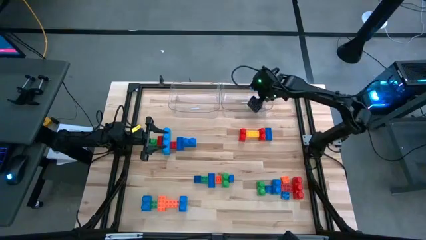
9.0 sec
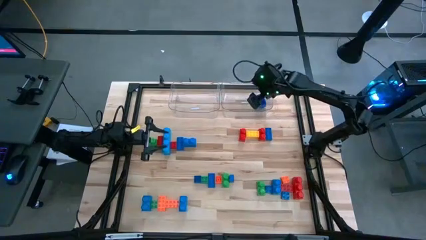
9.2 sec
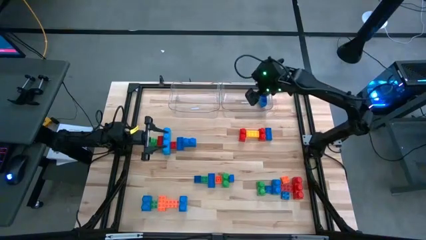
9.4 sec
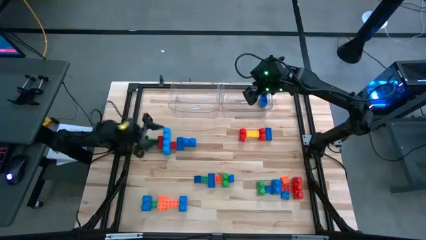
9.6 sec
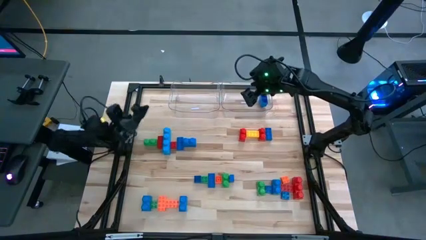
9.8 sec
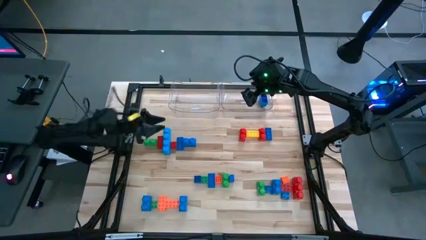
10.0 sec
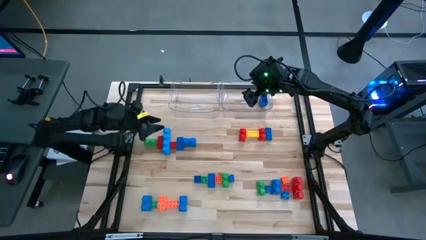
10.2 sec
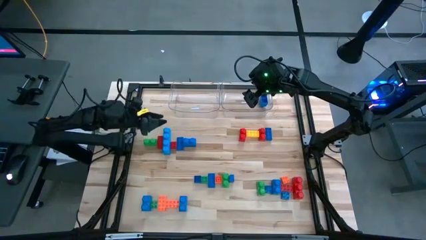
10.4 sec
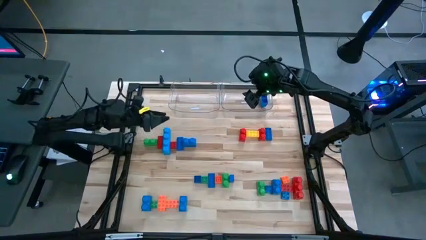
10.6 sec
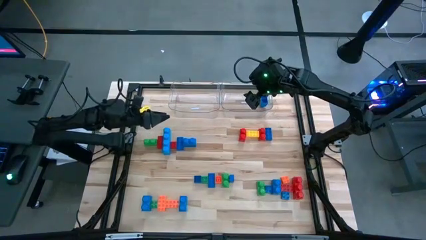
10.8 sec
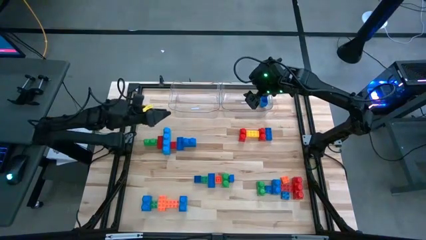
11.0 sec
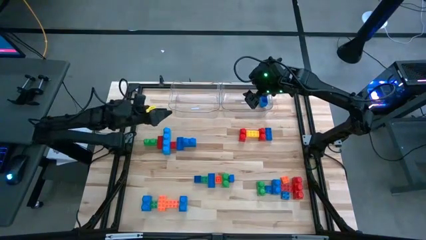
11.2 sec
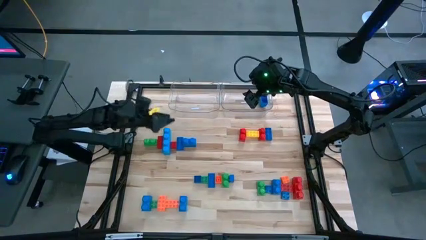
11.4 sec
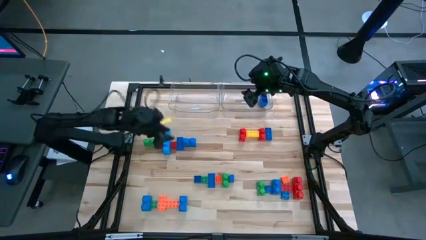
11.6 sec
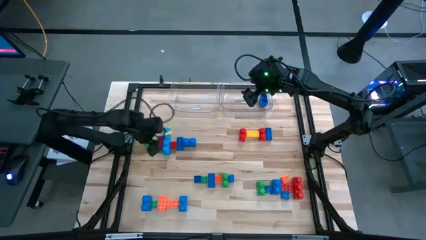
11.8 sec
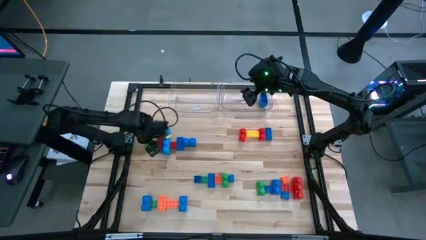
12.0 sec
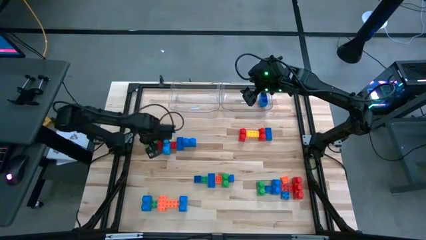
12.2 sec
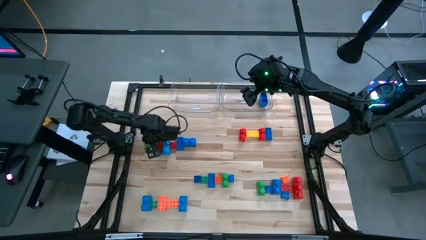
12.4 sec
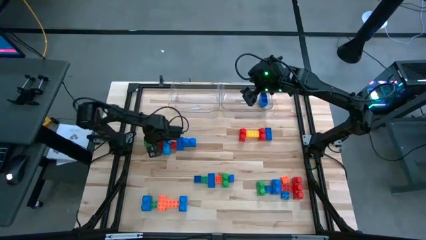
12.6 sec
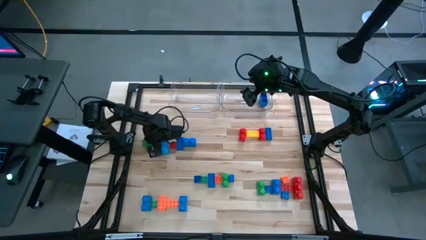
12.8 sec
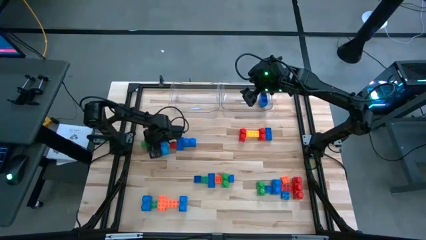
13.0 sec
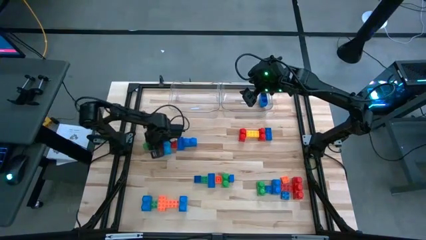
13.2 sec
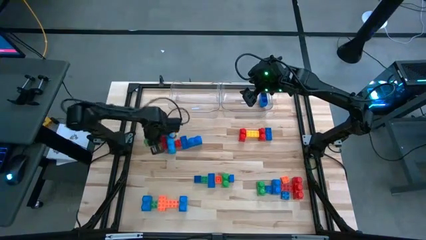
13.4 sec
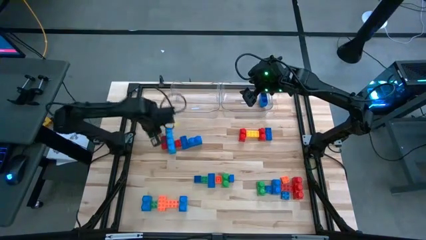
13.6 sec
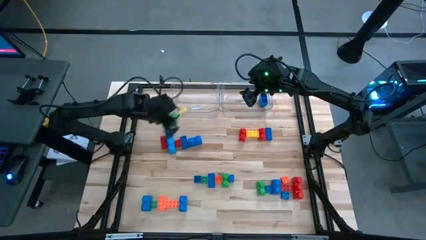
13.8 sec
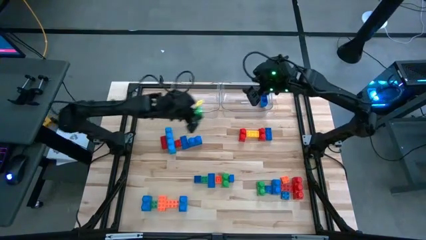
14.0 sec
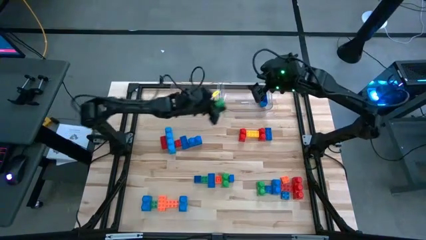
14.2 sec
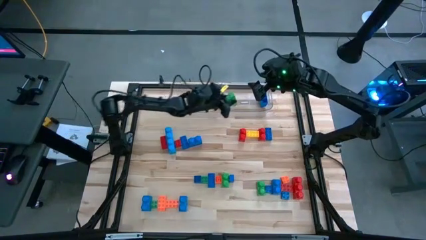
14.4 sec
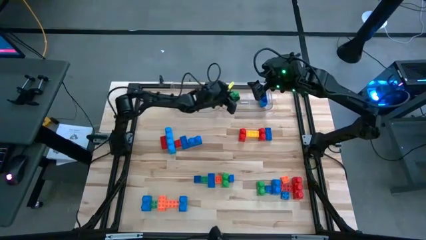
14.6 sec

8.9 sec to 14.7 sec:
Task: Sort blocks by size
Put the top left green lego piece into the right transparent bin

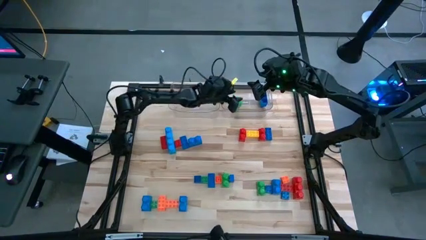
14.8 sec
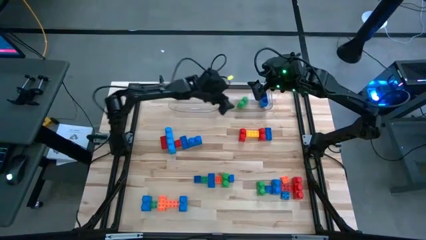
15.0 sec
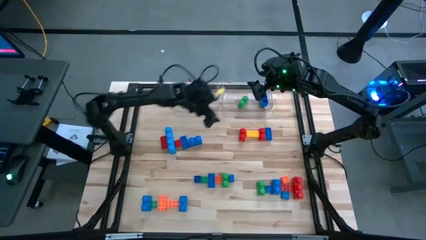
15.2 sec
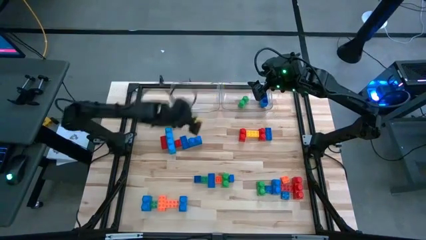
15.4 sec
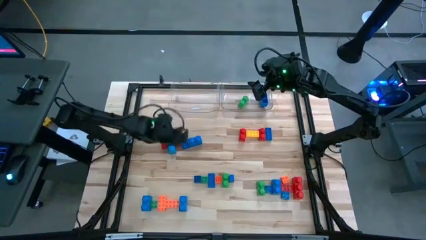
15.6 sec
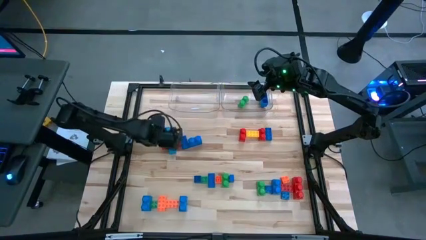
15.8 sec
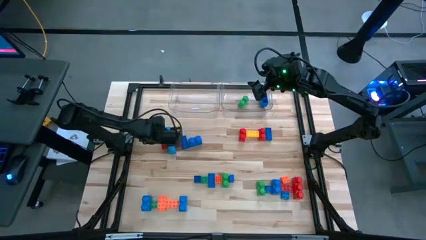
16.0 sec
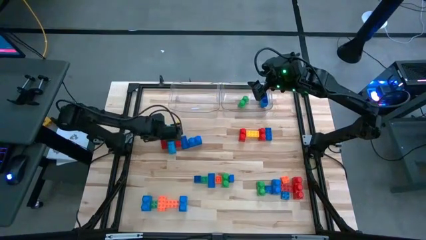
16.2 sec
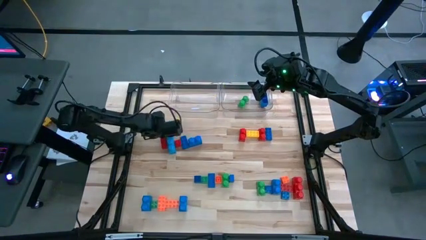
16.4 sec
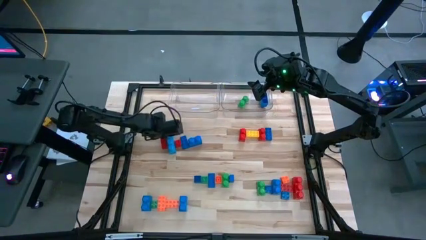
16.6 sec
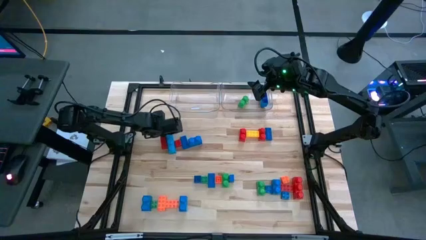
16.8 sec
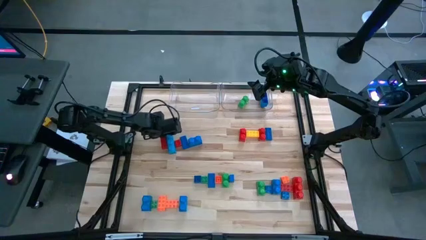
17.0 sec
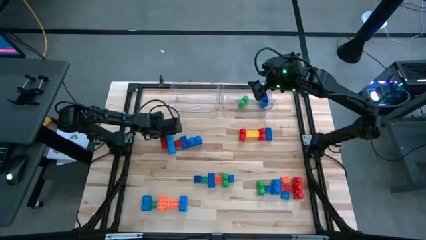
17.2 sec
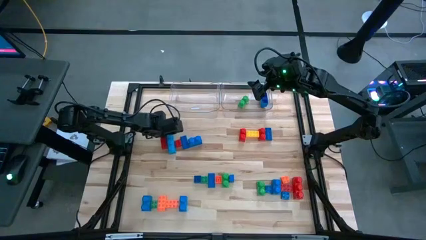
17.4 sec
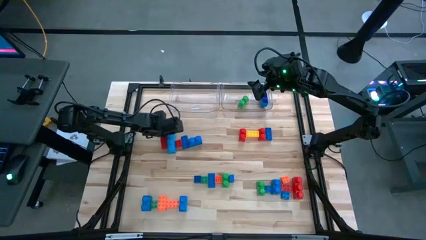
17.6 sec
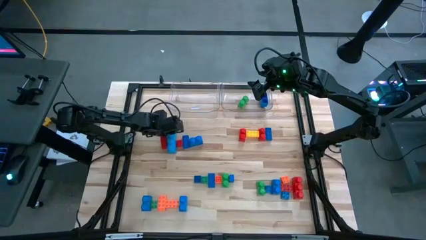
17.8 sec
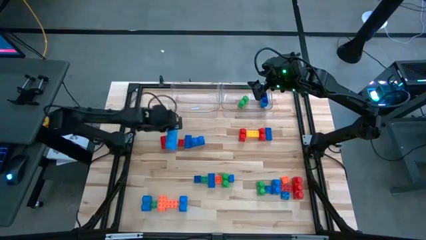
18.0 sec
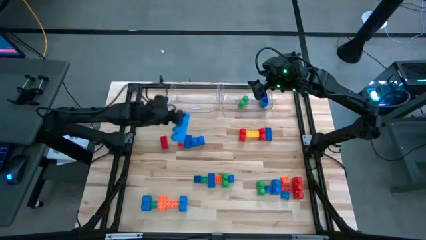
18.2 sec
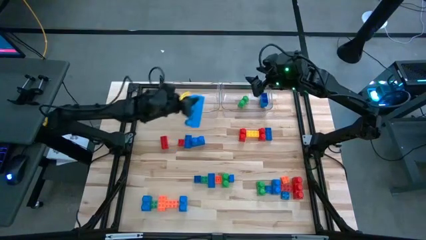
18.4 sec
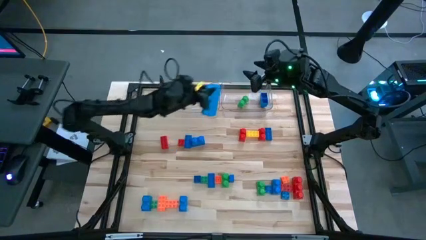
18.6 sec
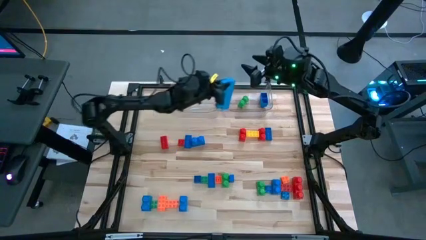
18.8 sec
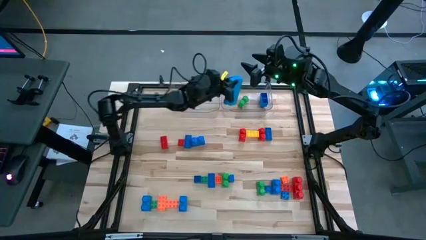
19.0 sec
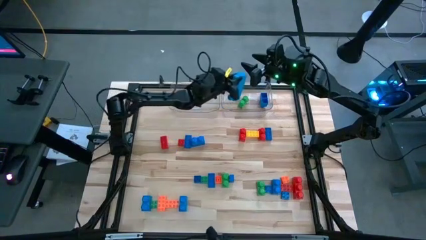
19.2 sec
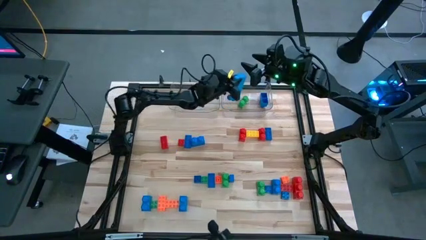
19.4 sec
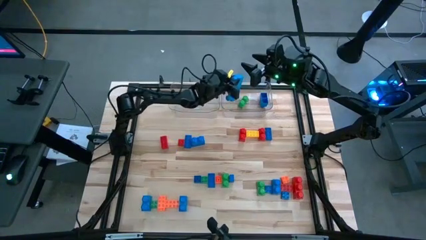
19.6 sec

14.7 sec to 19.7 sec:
Put the blue lego piece into the right transparent bin

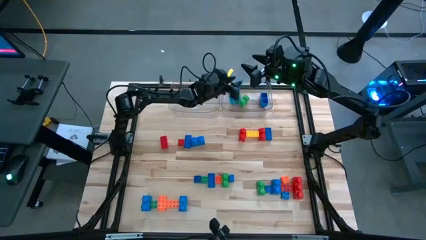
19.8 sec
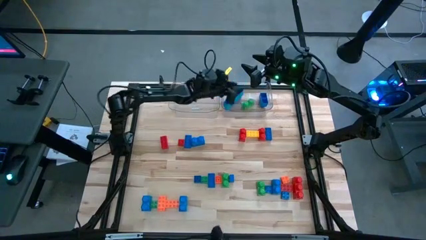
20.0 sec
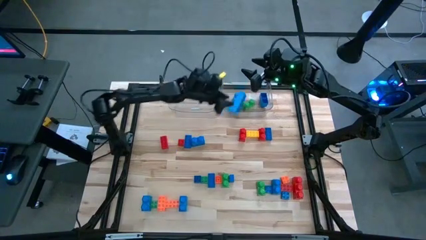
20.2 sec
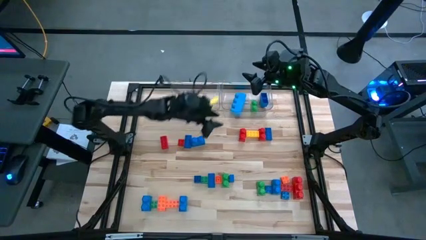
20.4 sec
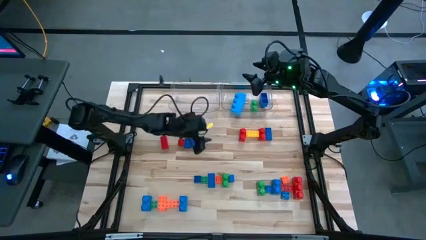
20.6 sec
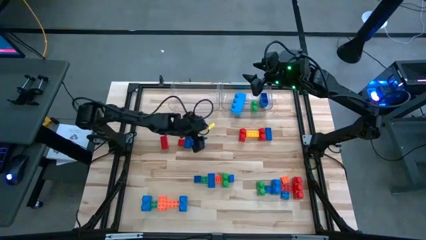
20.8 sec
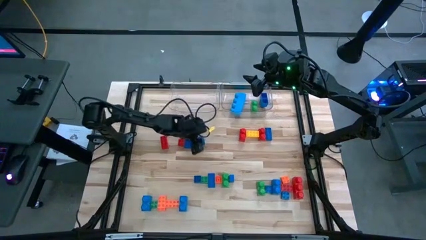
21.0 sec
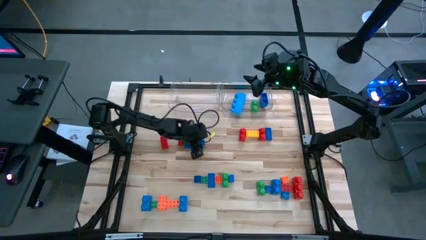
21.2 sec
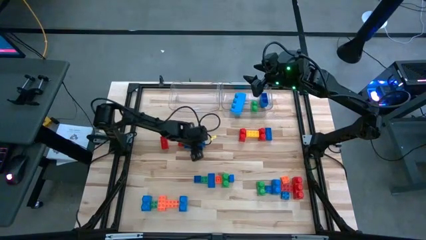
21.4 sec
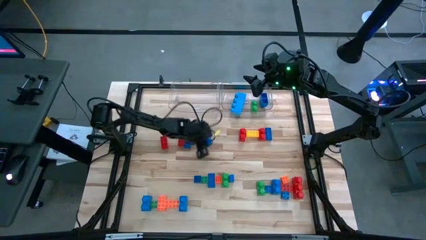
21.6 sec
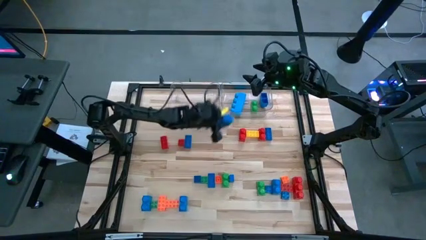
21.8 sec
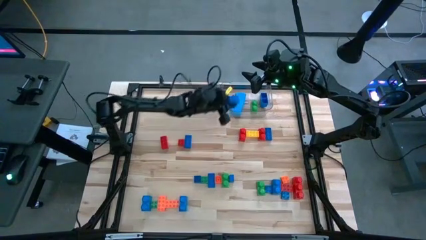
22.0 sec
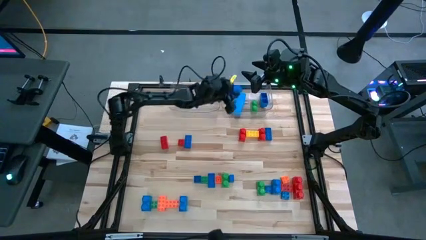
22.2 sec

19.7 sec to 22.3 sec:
Put the blue lego piece into the right transparent bin

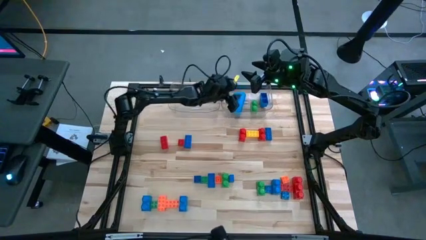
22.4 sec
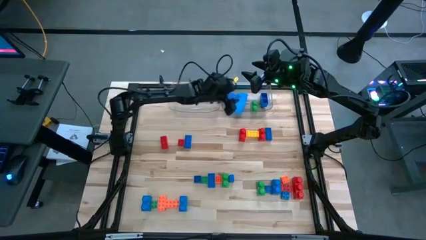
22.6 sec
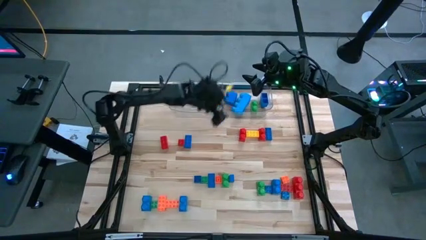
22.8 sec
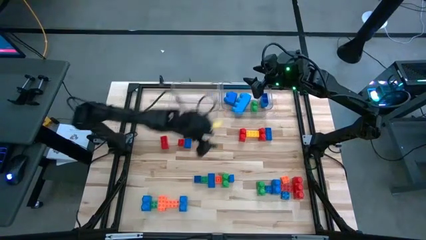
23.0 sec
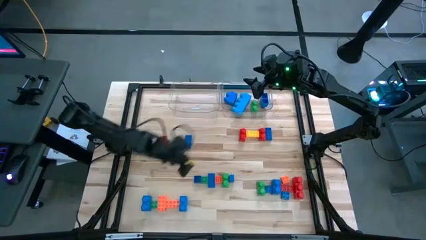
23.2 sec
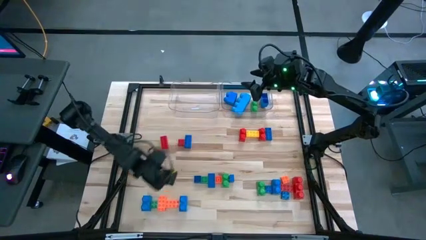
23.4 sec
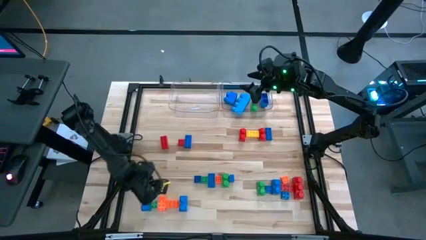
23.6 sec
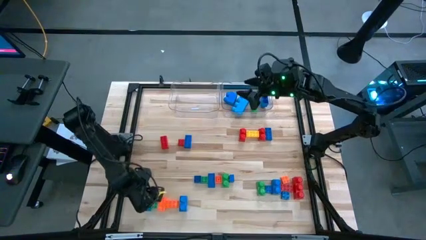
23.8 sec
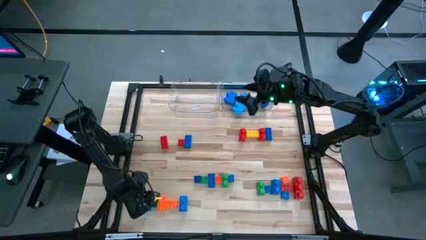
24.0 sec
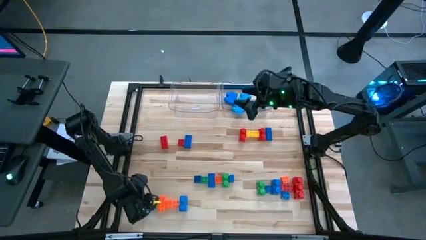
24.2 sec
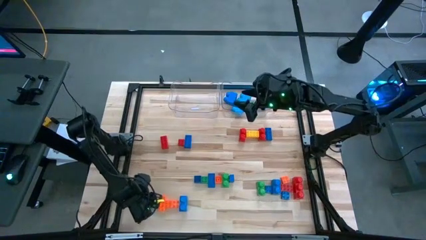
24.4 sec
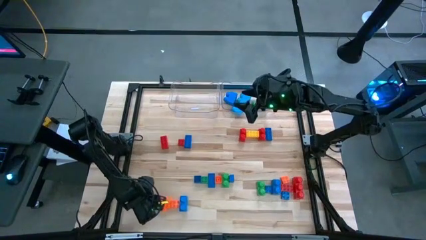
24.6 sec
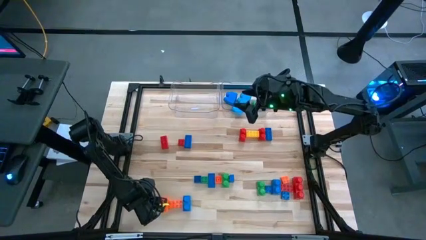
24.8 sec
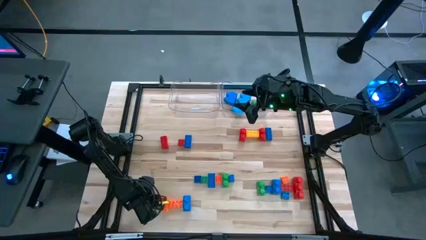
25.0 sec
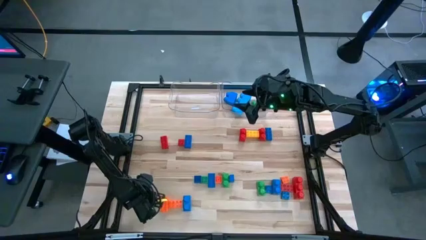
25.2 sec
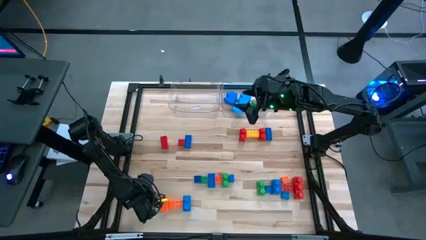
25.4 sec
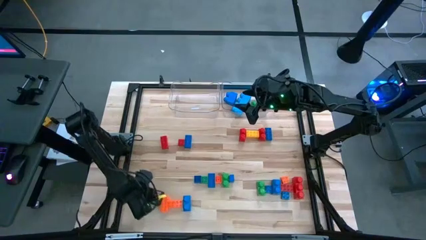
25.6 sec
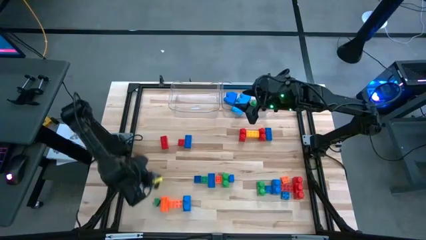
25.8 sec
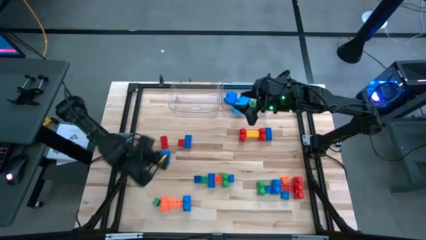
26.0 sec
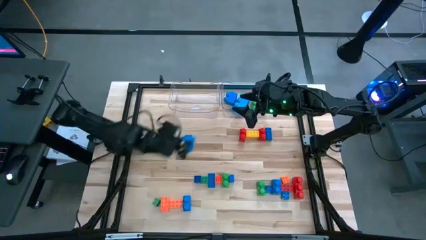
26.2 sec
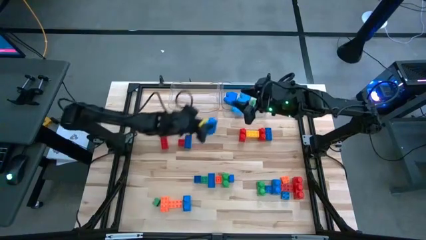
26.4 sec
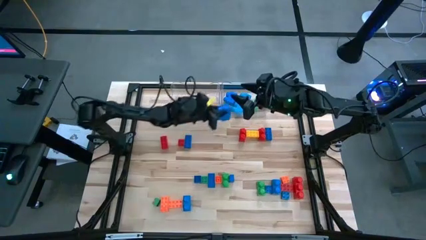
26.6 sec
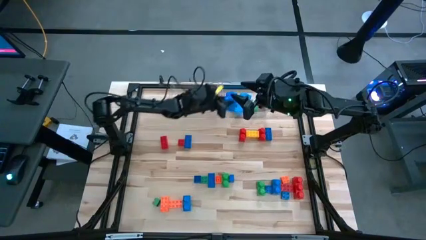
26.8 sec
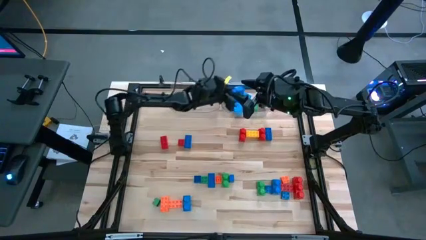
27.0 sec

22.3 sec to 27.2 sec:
Put the blue lego piece into the right transparent bin
